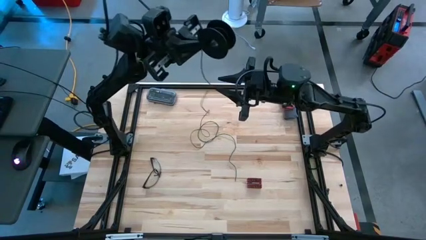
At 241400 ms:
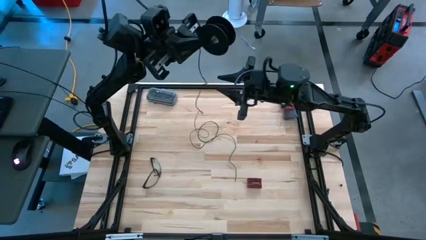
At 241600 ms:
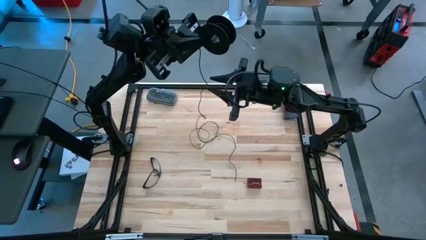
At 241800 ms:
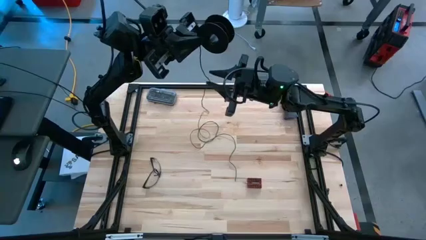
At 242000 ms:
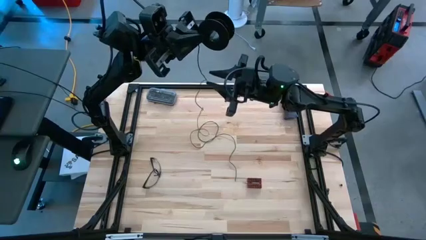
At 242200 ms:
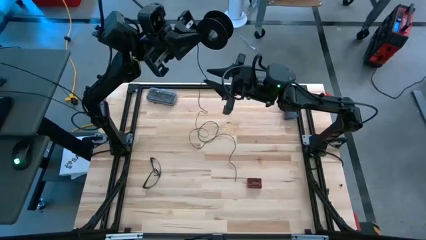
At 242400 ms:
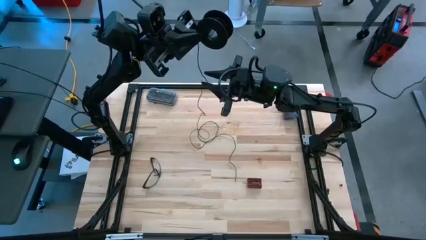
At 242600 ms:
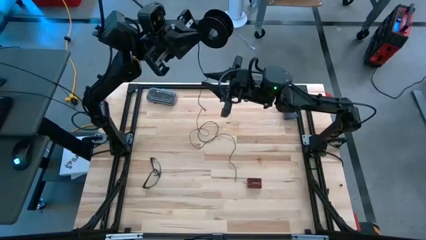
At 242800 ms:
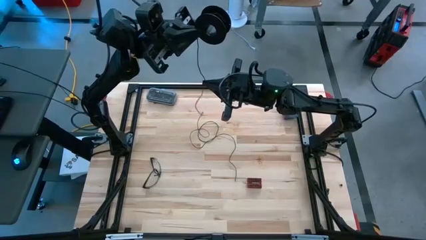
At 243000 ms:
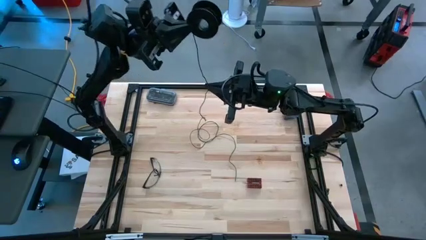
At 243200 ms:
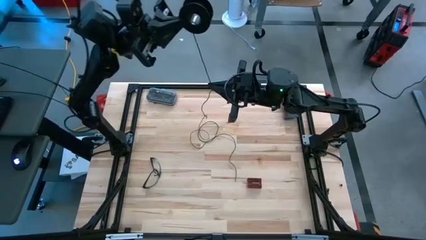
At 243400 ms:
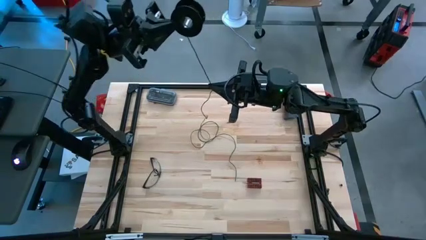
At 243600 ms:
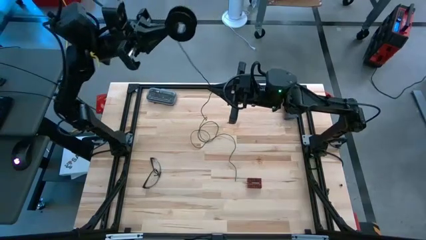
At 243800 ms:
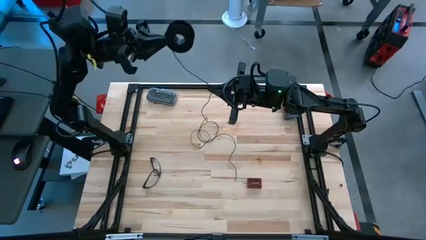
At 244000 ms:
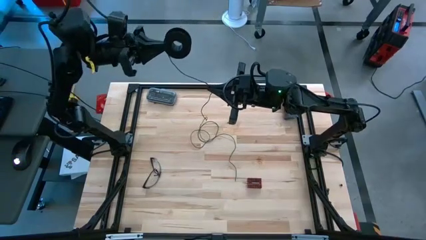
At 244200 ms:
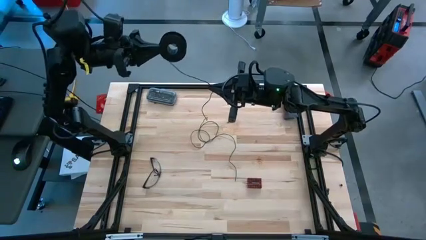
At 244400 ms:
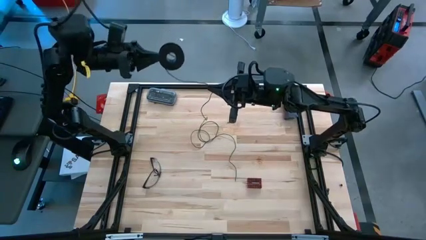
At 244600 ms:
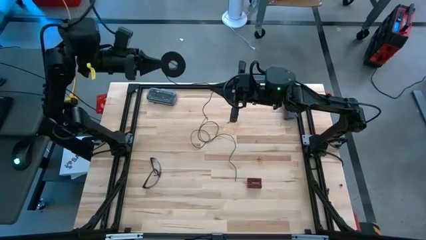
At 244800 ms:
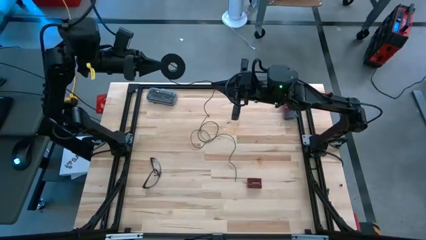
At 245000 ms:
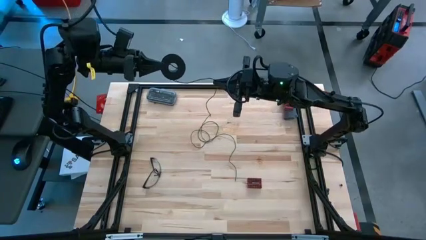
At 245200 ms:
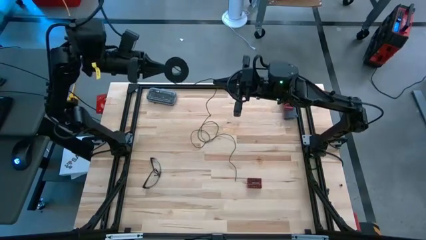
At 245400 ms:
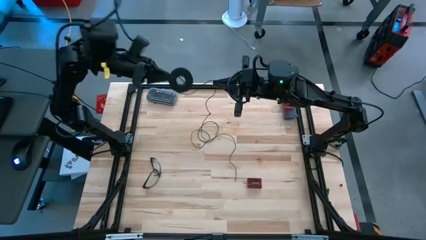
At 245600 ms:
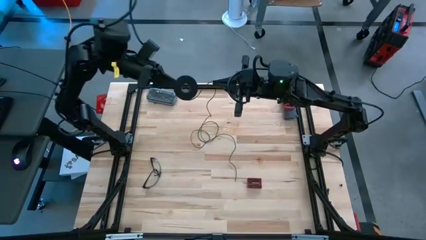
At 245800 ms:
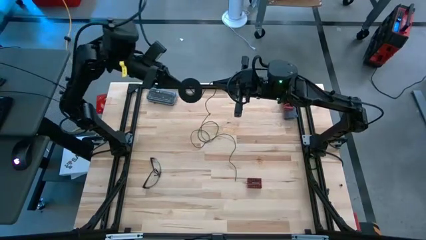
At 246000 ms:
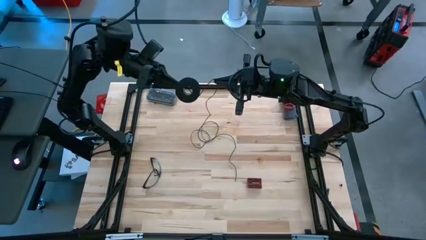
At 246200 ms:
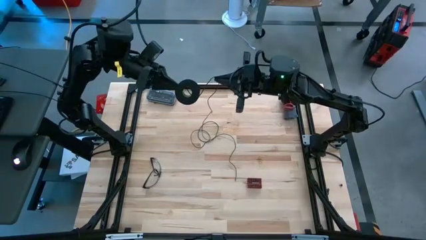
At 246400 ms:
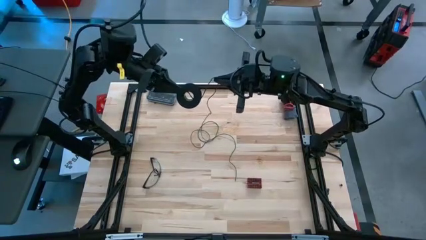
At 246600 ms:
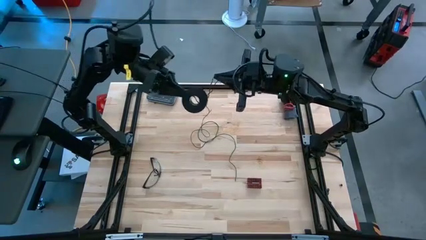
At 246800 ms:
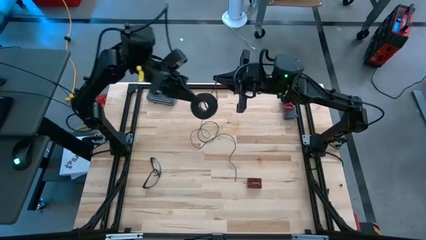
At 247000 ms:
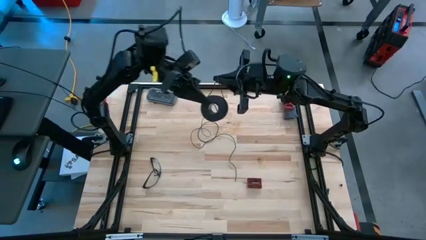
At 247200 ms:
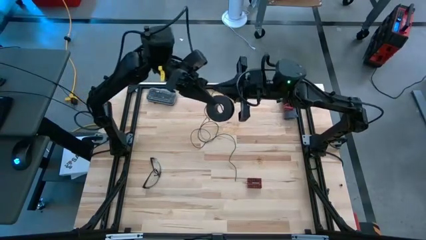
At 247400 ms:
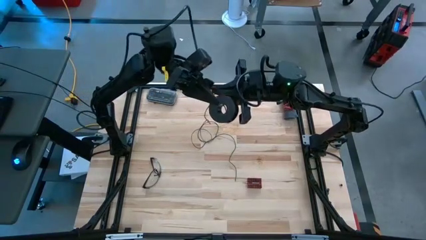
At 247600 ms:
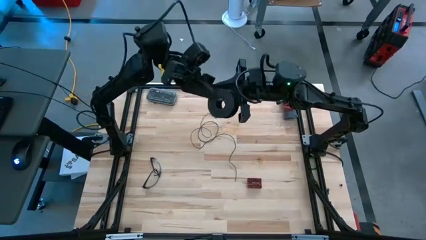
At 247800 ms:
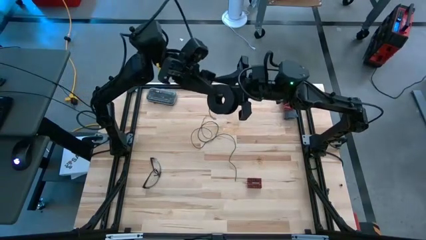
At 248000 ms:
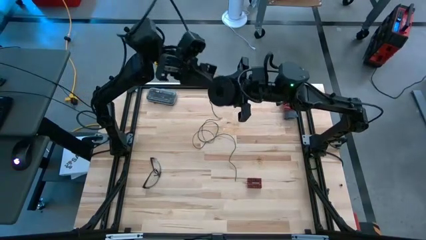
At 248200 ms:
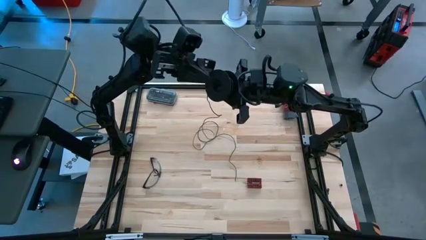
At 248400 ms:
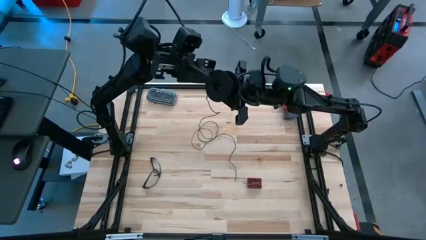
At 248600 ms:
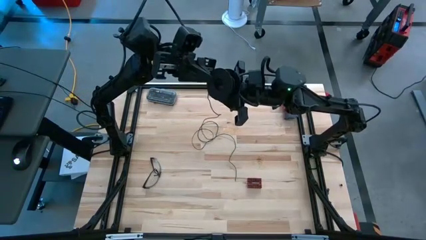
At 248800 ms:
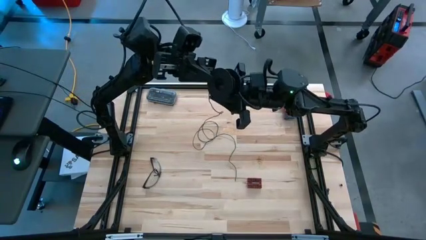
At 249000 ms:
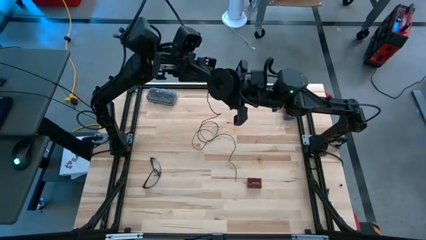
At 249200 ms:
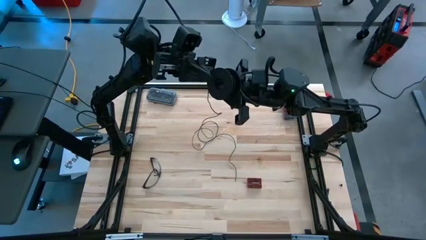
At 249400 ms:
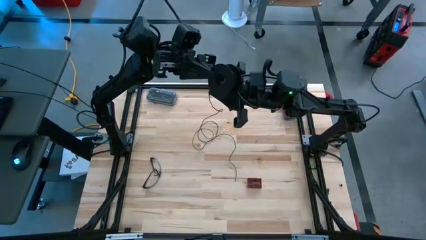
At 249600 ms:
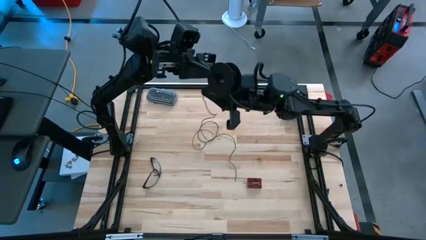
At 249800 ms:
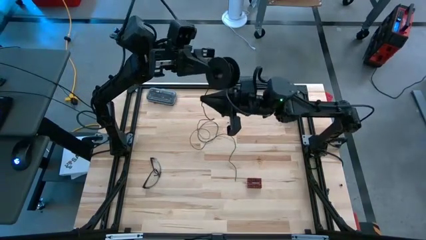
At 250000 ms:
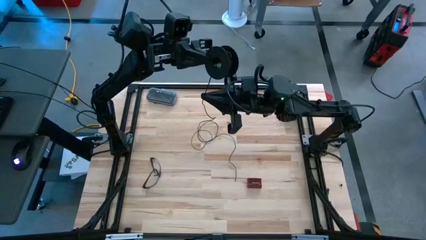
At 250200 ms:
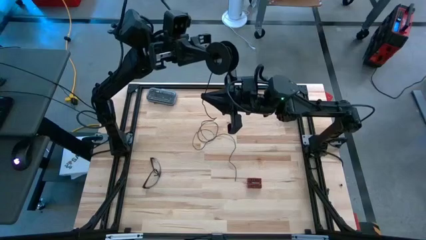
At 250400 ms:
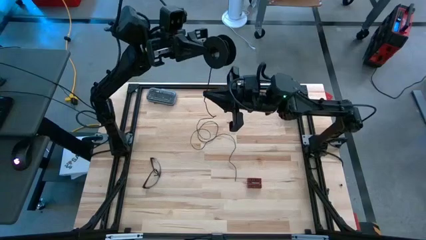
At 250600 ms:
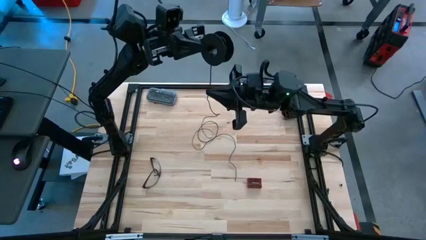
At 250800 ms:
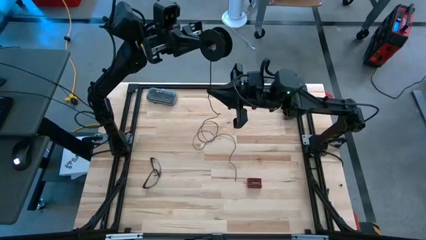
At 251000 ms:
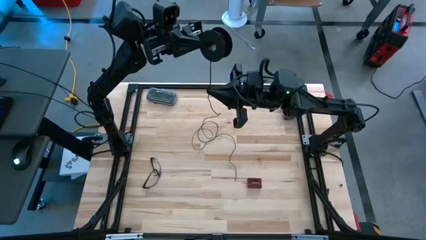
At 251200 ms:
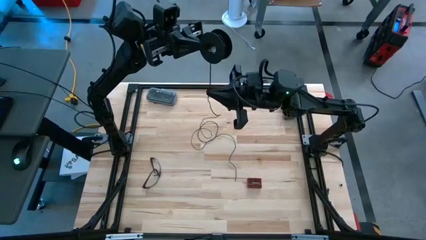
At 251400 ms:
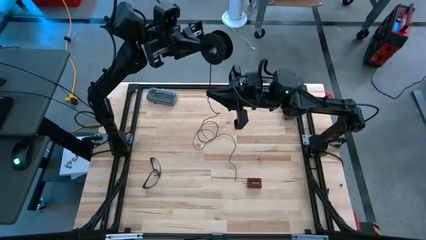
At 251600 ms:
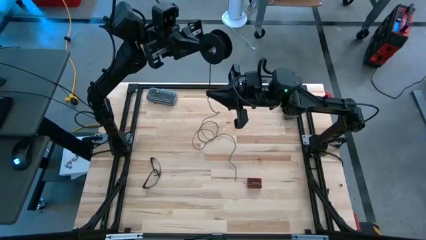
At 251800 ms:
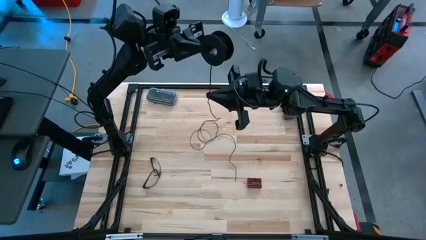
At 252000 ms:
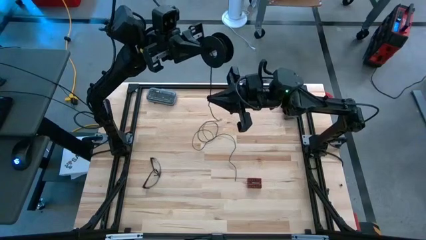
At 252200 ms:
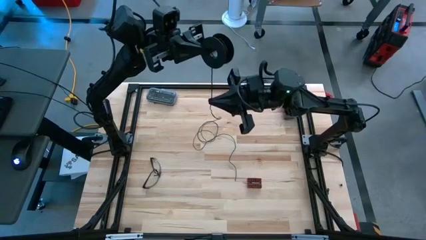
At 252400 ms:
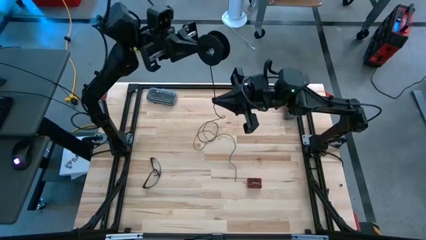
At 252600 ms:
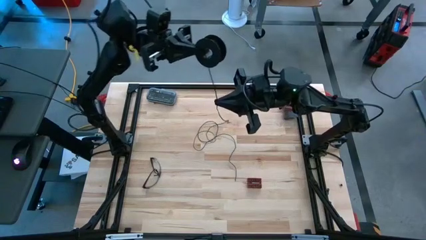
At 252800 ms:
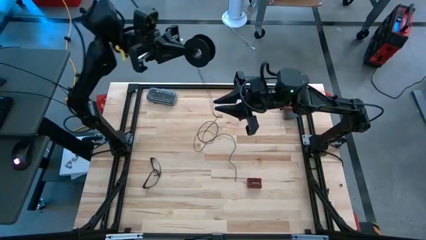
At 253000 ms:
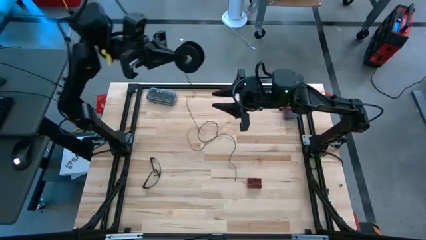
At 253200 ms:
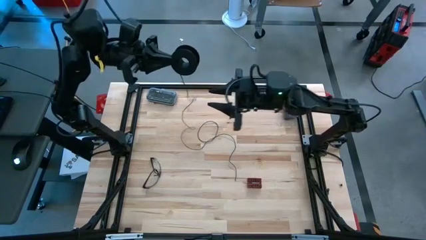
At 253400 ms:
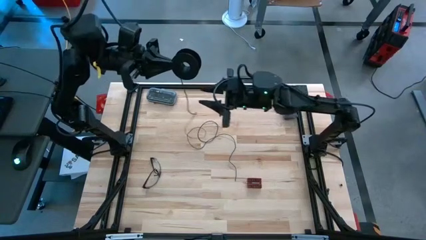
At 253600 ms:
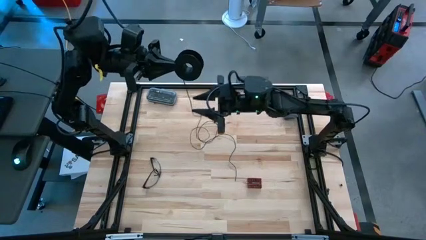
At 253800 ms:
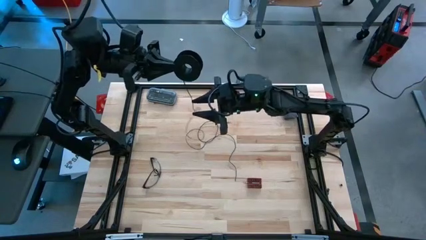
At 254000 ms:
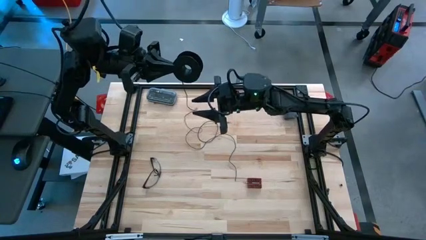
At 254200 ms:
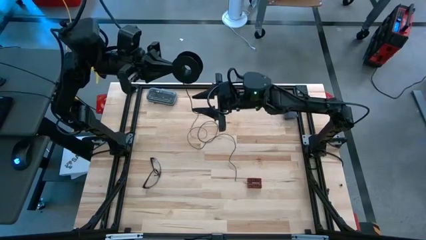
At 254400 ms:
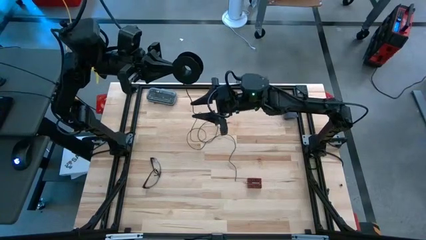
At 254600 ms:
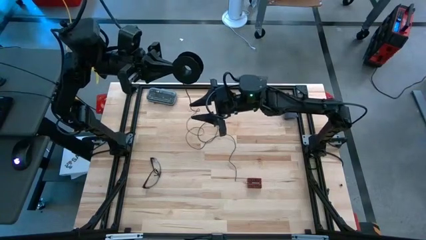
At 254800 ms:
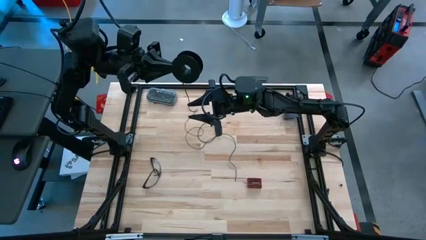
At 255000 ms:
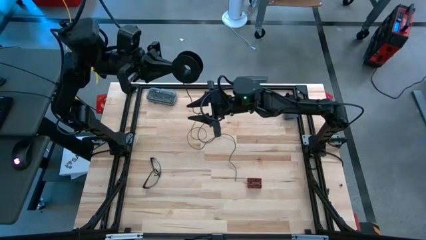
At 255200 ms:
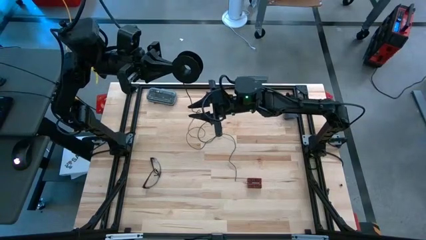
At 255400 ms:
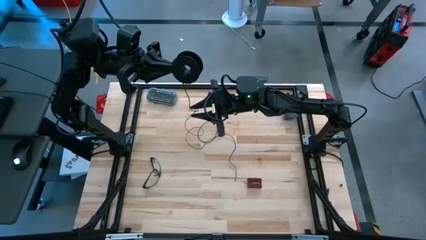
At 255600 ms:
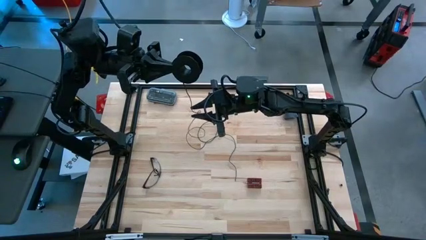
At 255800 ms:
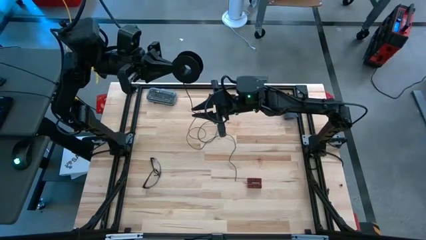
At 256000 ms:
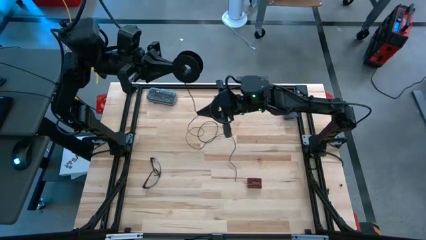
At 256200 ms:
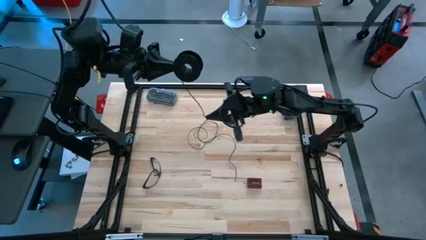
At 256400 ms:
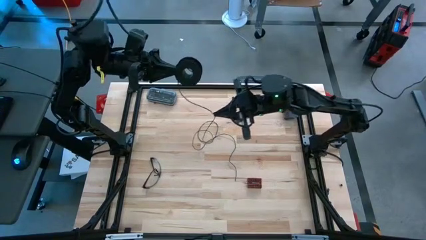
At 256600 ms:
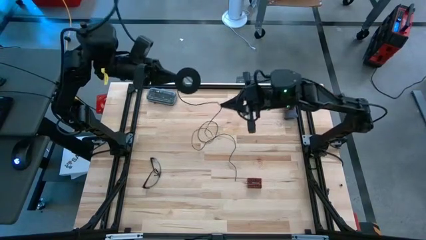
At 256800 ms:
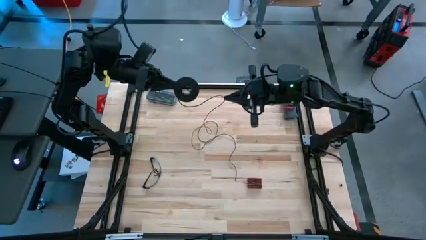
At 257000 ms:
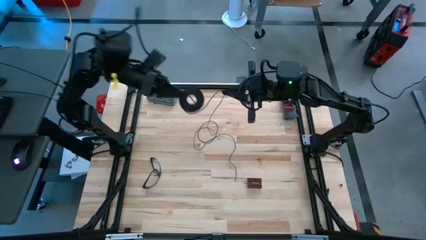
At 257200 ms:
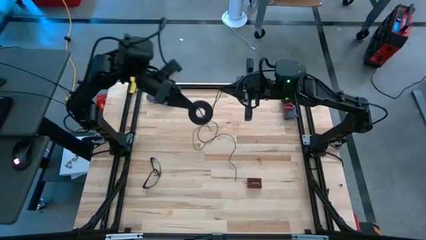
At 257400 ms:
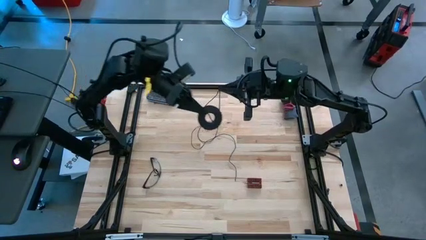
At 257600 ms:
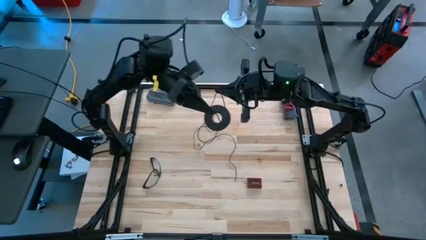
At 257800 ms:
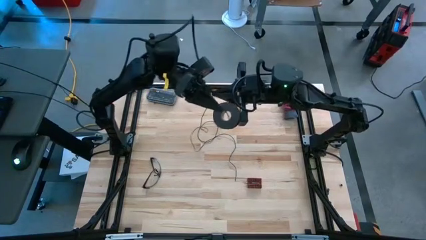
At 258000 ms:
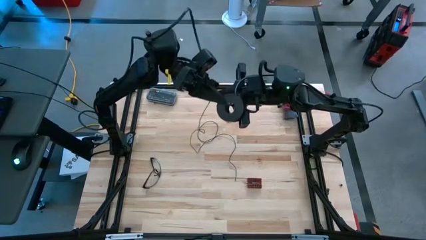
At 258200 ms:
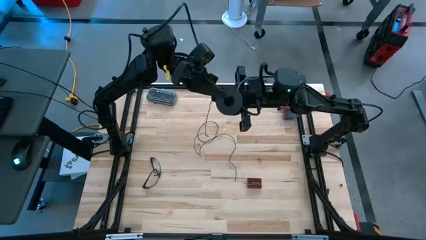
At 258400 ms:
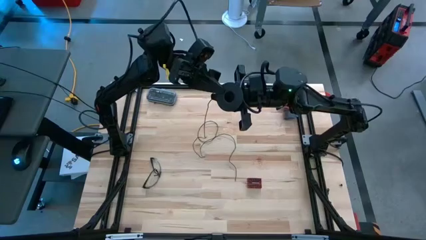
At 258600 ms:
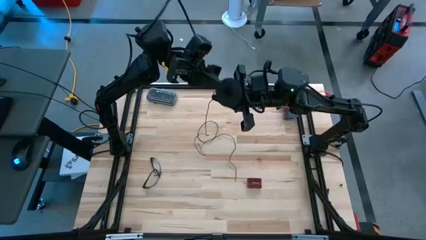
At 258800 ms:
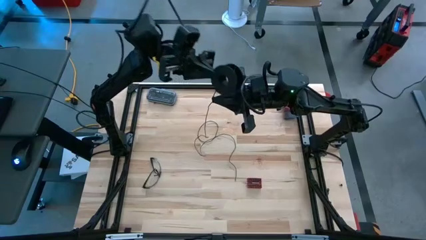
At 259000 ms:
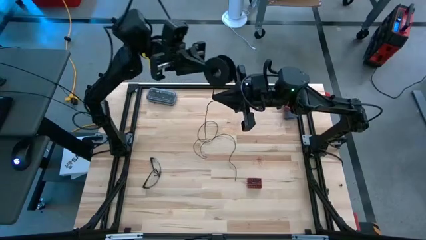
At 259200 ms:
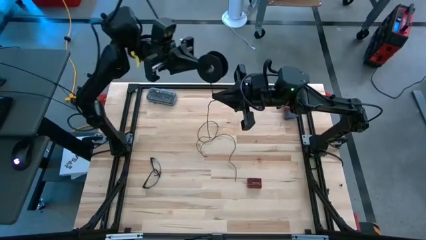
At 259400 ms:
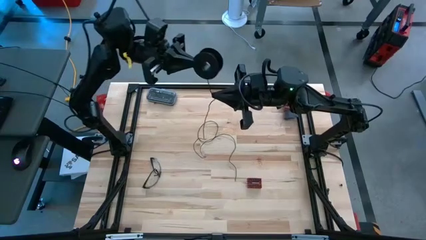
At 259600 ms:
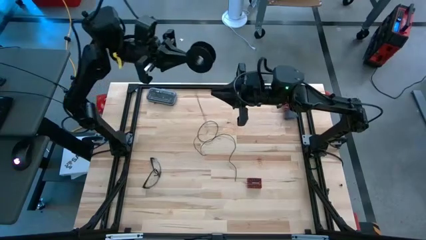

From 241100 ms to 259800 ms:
Task: Coil cords
Coil the black wire into the spool
